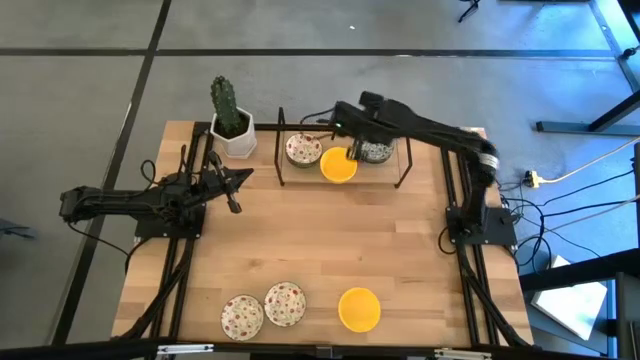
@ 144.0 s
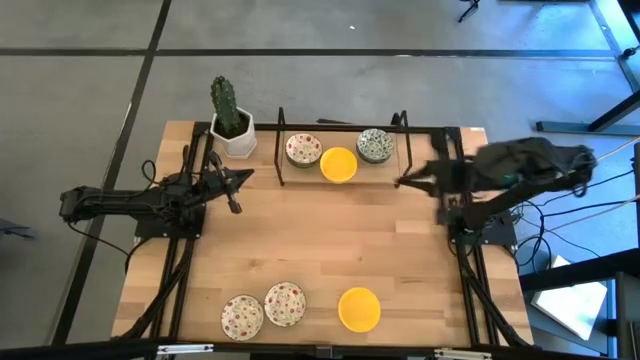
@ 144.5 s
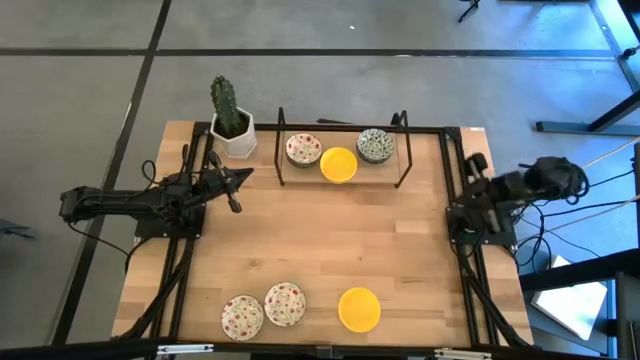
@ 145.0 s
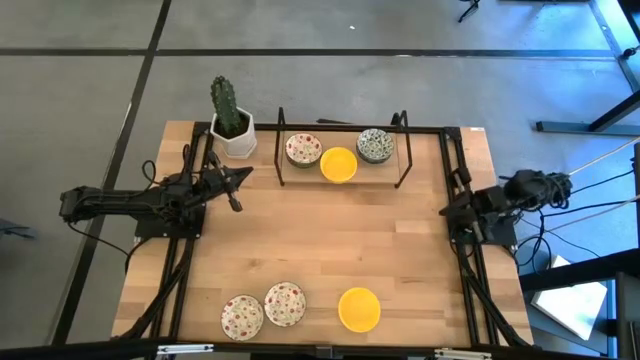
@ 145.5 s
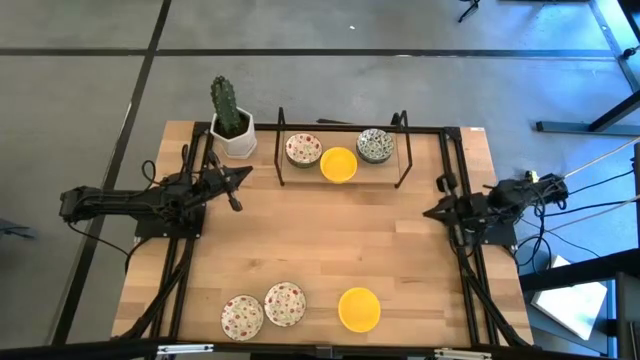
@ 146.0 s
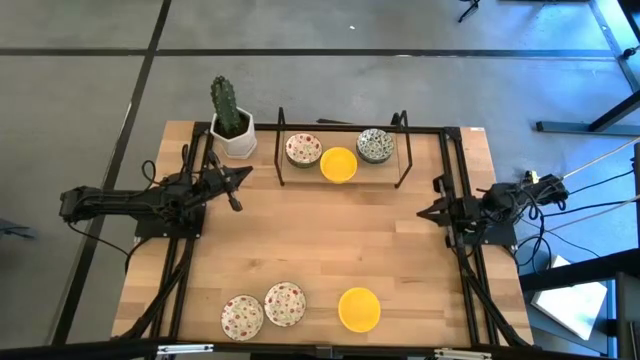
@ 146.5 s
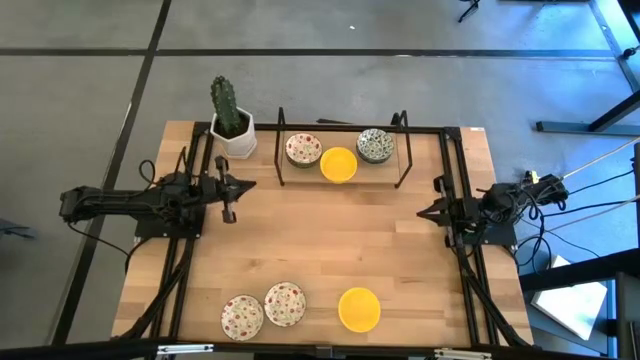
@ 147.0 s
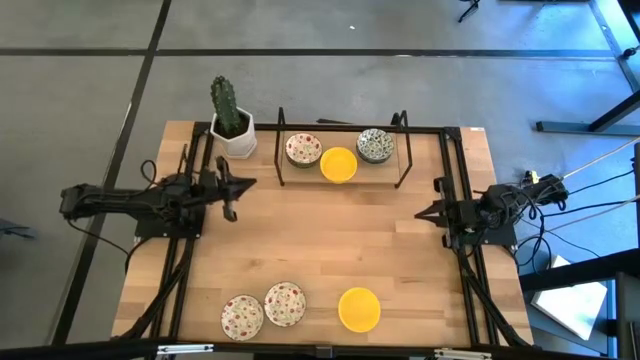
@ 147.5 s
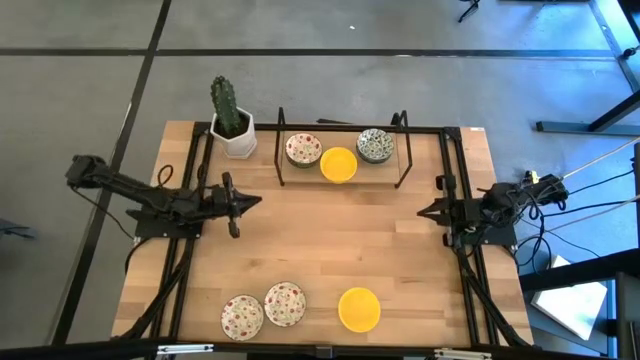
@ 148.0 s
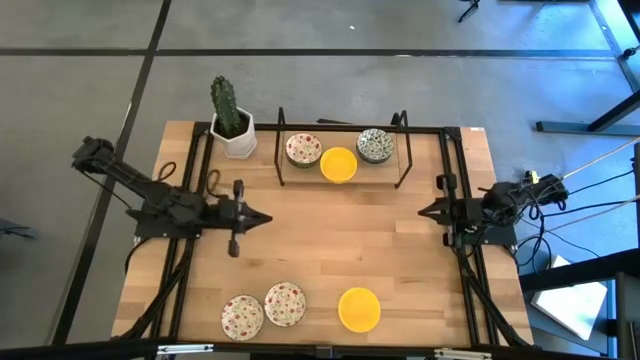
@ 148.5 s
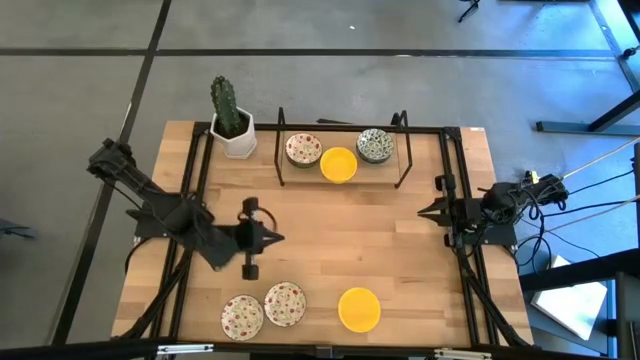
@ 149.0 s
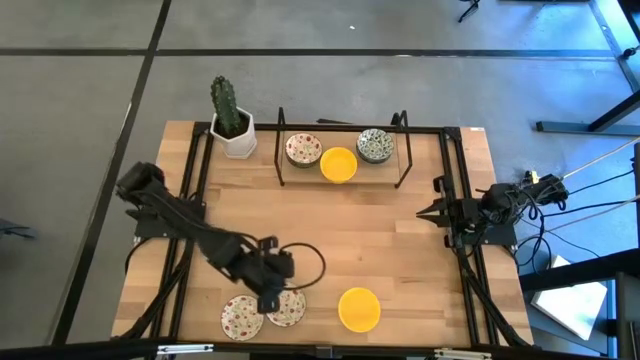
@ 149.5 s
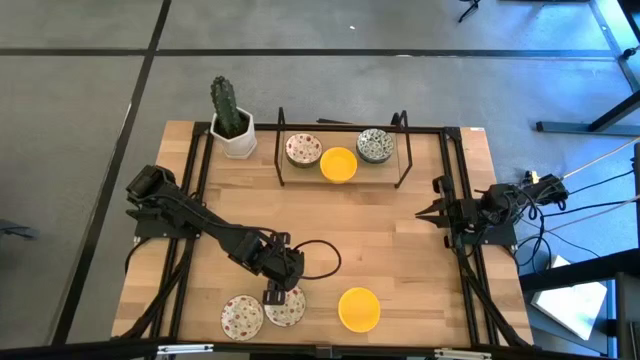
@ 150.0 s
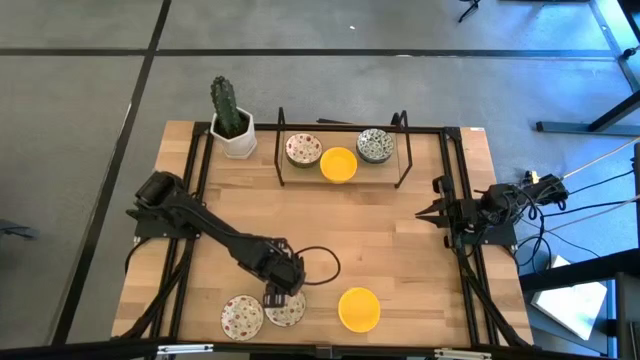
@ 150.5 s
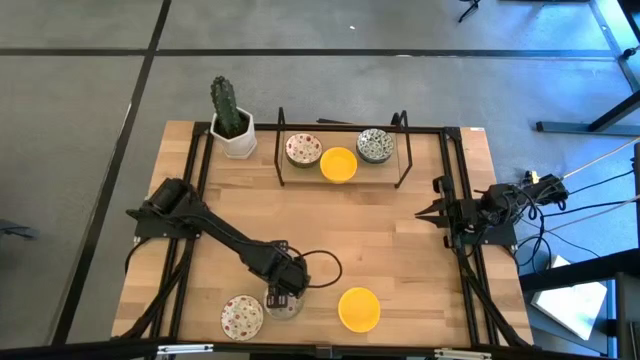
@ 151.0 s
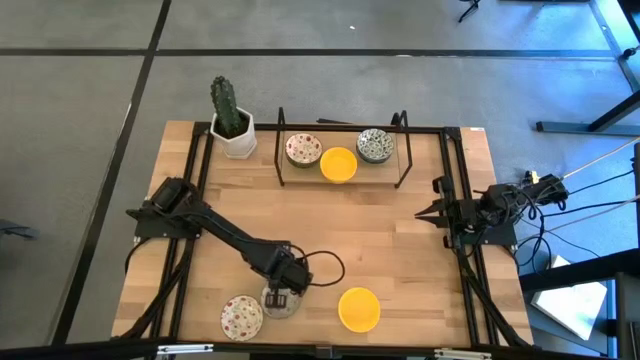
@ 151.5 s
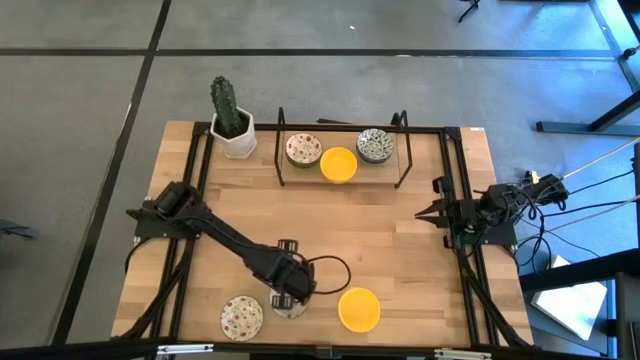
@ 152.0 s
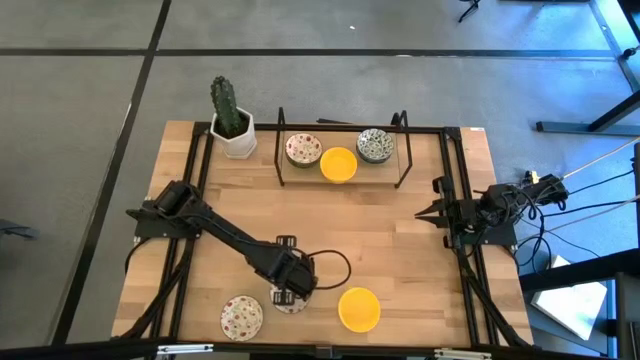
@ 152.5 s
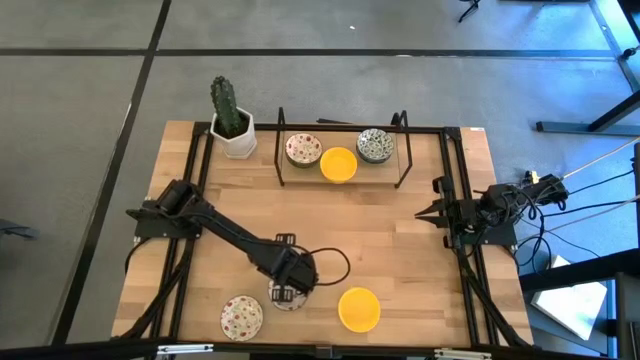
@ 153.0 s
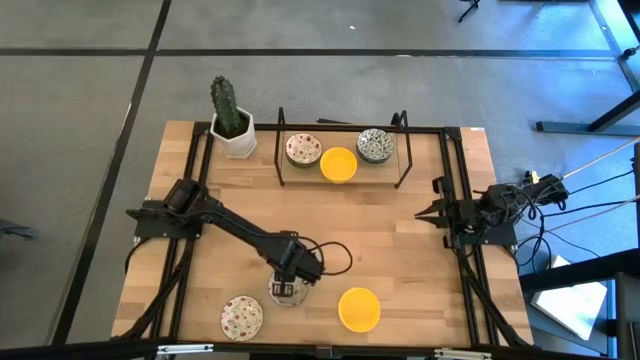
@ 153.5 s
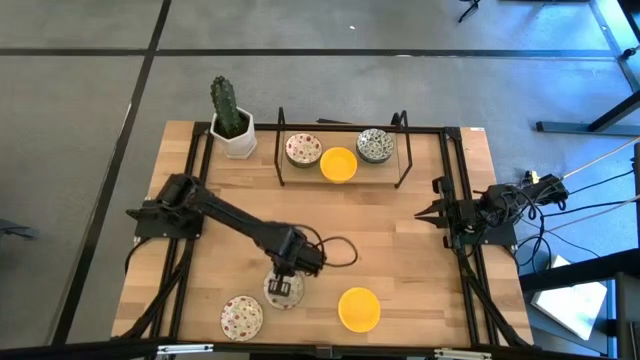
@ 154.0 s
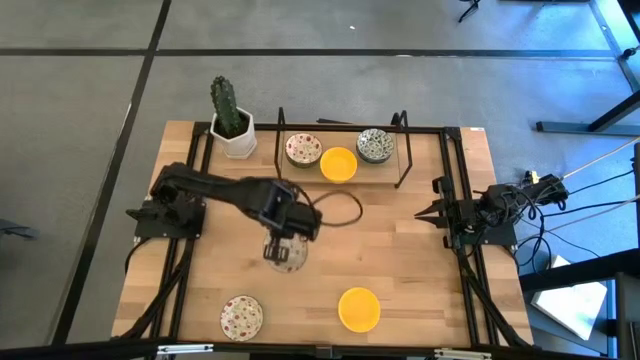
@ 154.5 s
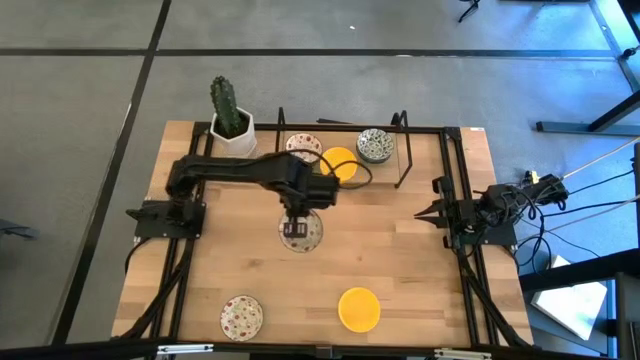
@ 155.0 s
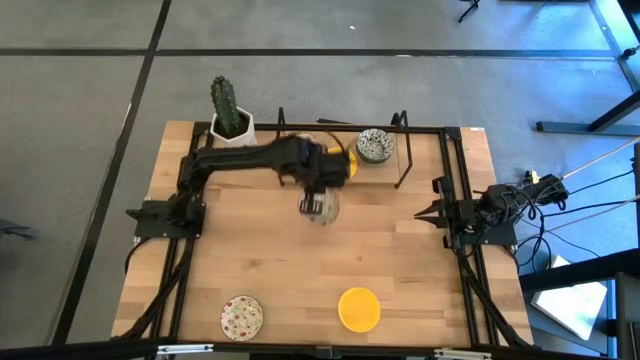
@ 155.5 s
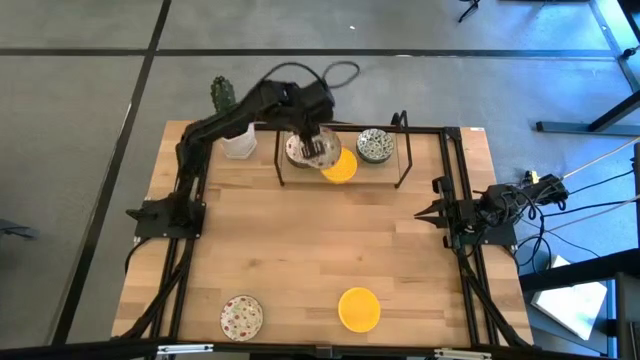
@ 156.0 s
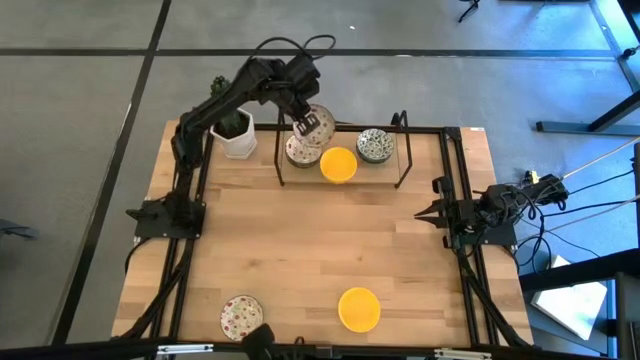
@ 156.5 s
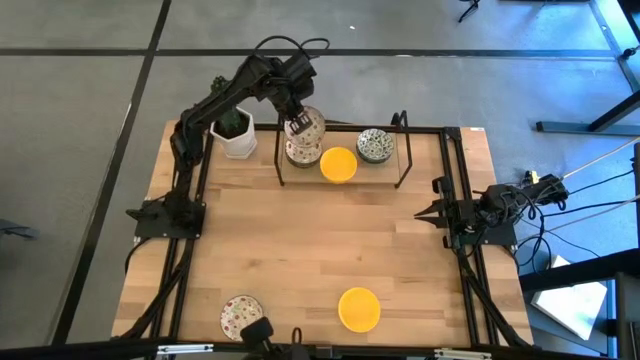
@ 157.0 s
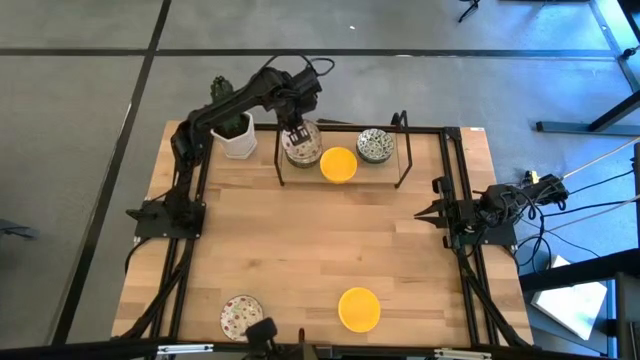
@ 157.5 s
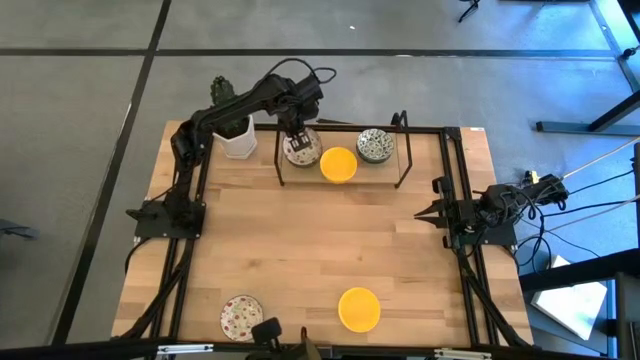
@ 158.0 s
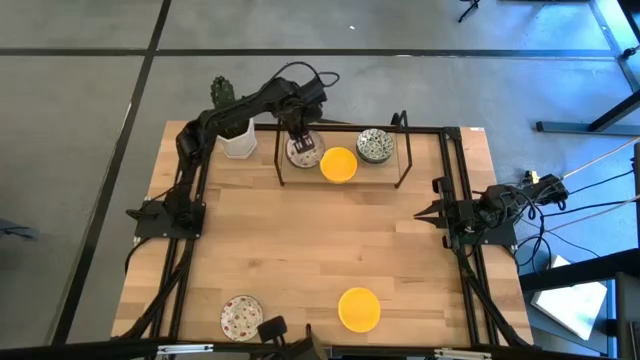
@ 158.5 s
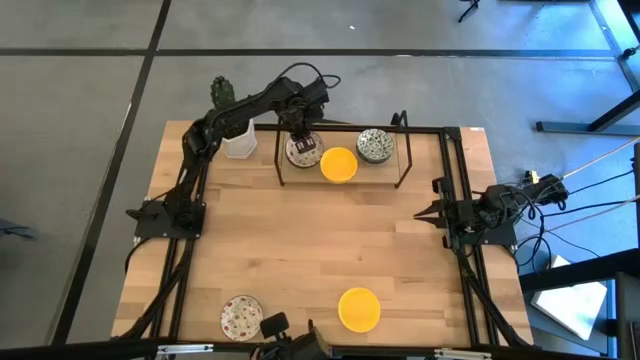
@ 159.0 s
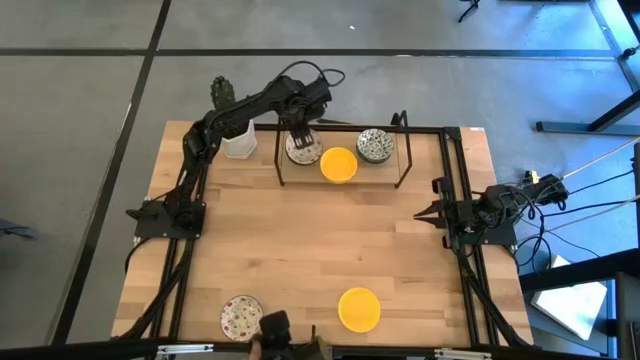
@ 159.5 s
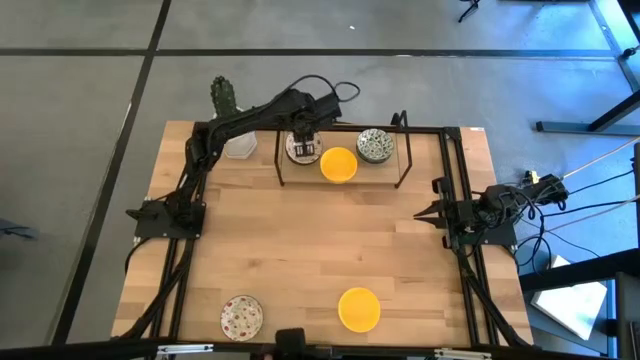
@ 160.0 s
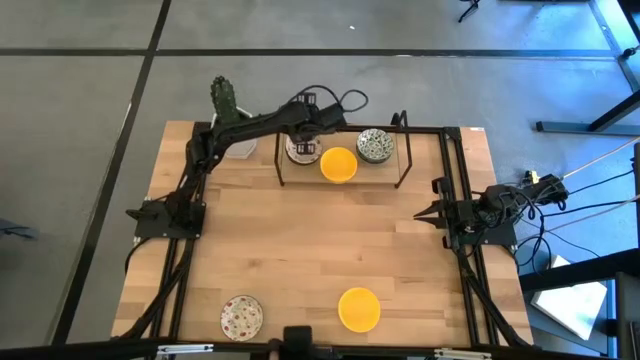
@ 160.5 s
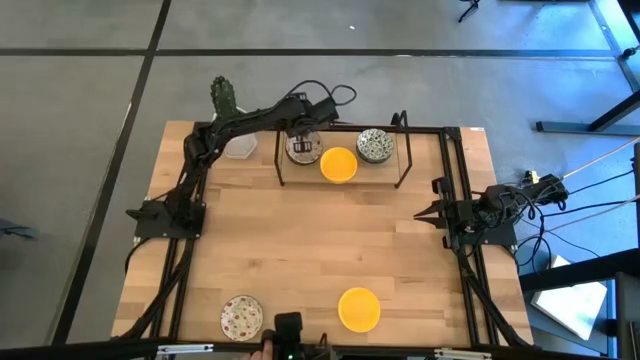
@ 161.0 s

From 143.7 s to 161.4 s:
Task: Pick & Place Mini bowls
Stack the white white red patterned on top of the white white red patterned on the shelf
